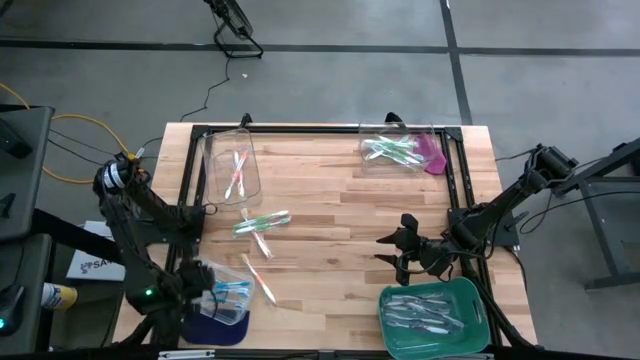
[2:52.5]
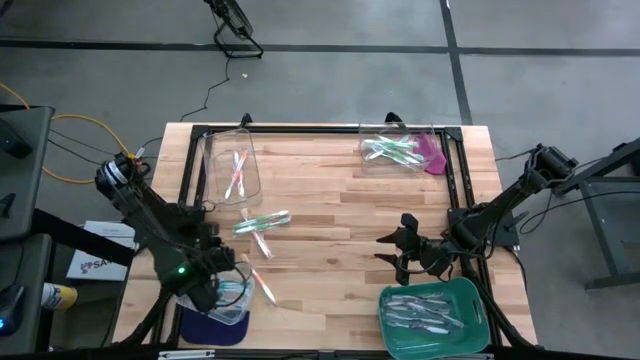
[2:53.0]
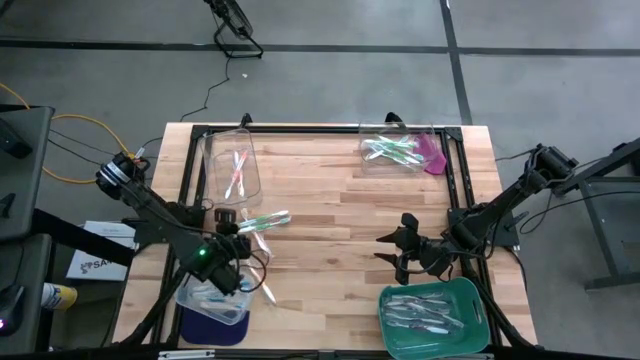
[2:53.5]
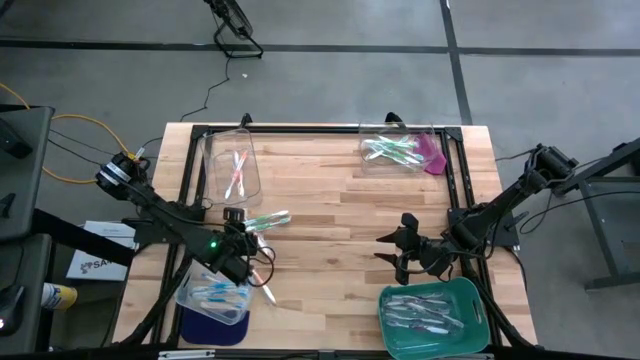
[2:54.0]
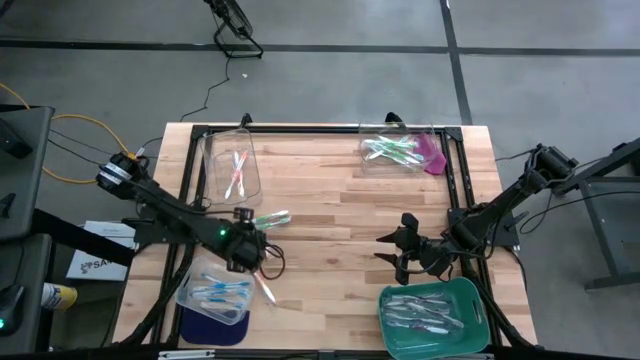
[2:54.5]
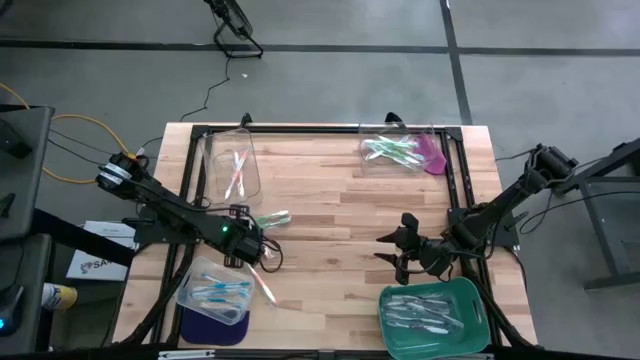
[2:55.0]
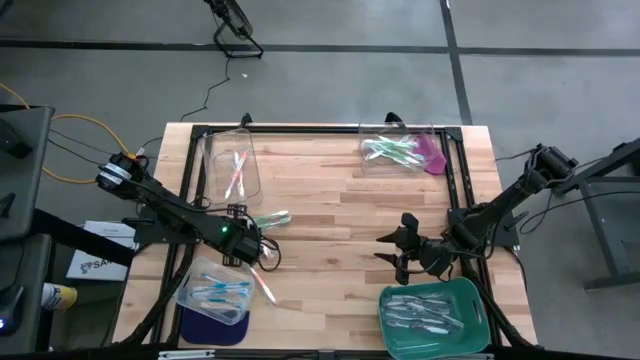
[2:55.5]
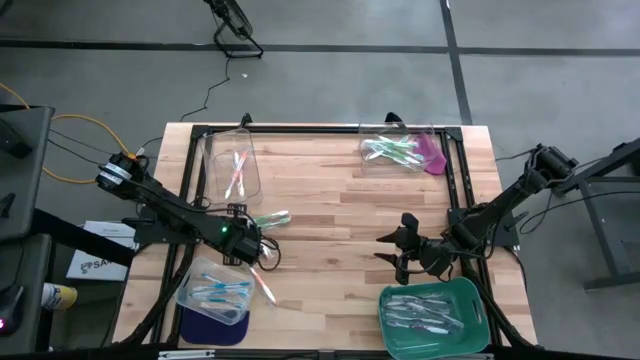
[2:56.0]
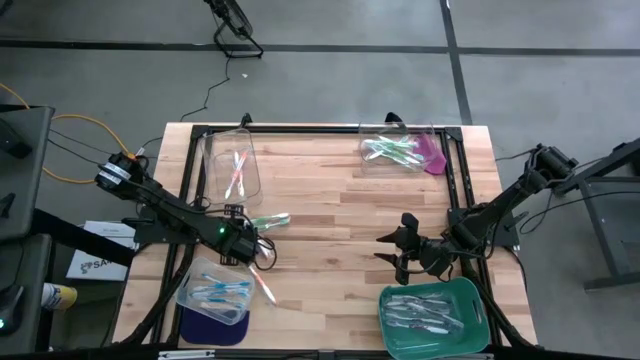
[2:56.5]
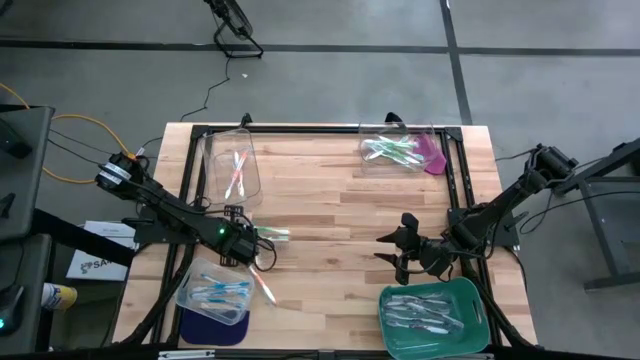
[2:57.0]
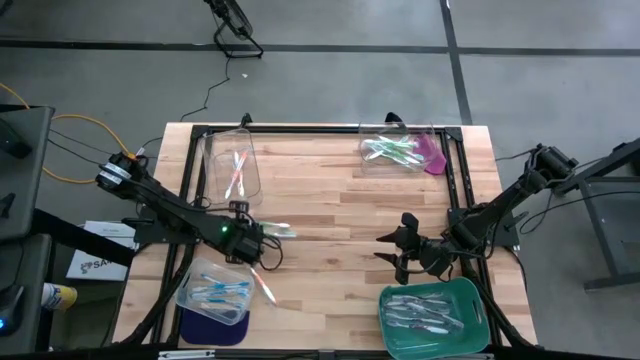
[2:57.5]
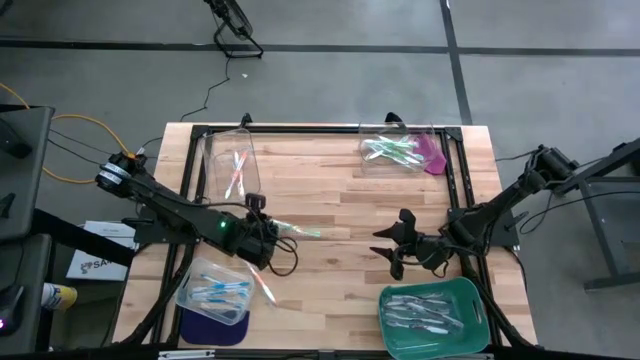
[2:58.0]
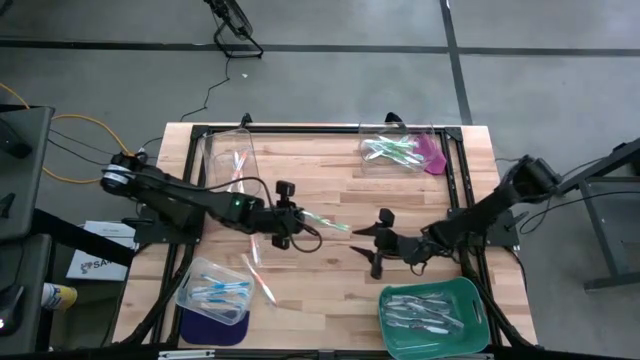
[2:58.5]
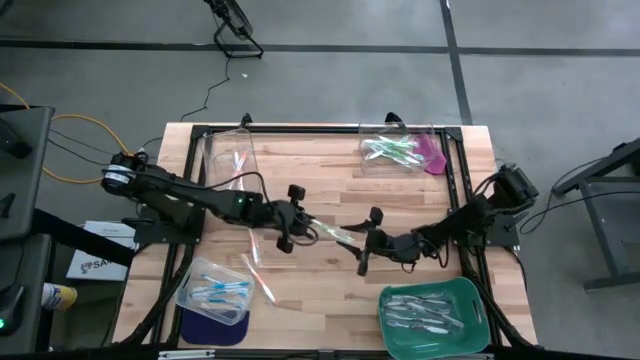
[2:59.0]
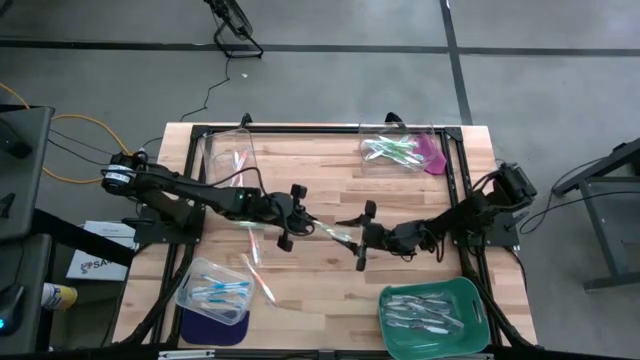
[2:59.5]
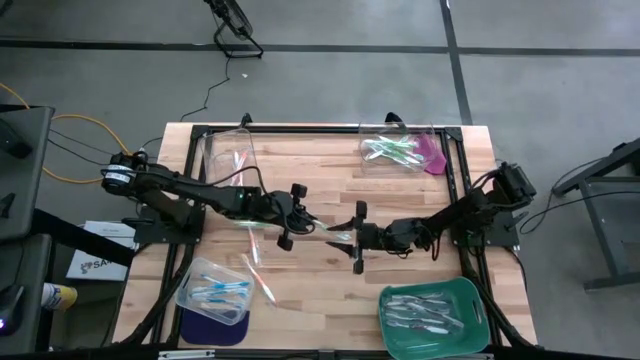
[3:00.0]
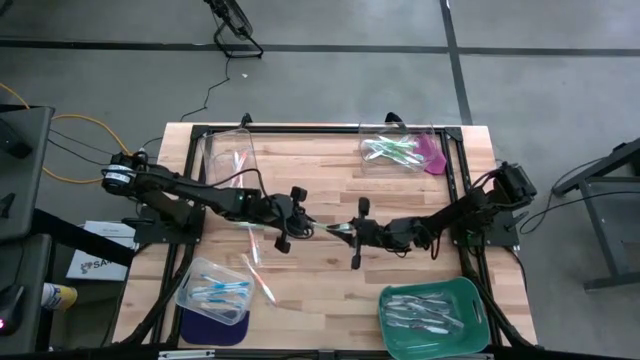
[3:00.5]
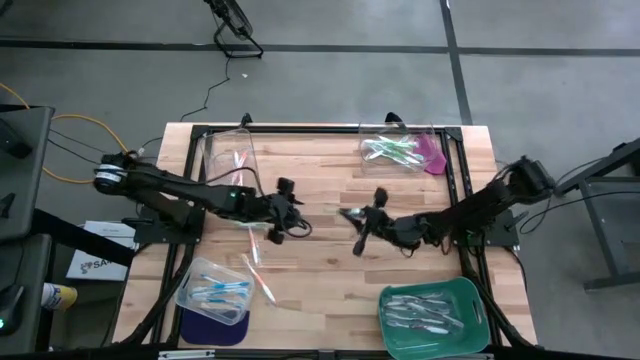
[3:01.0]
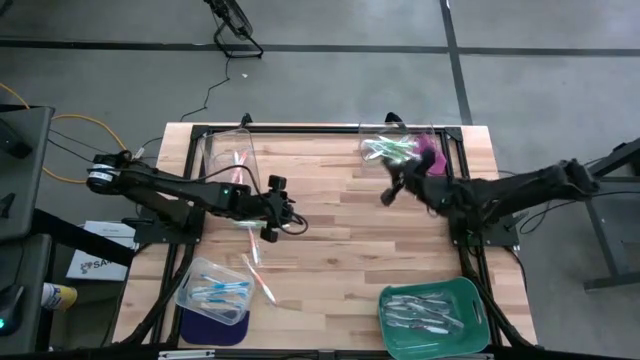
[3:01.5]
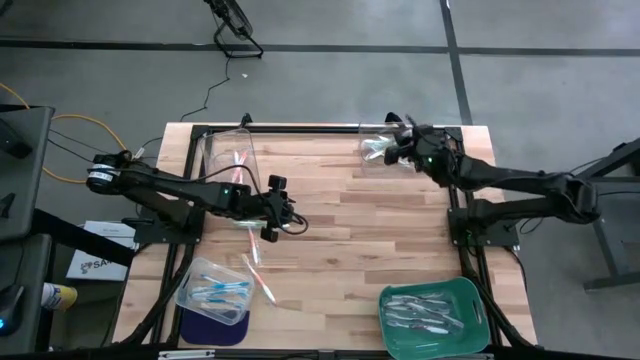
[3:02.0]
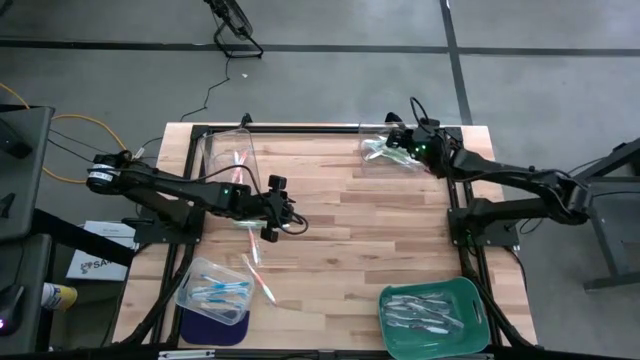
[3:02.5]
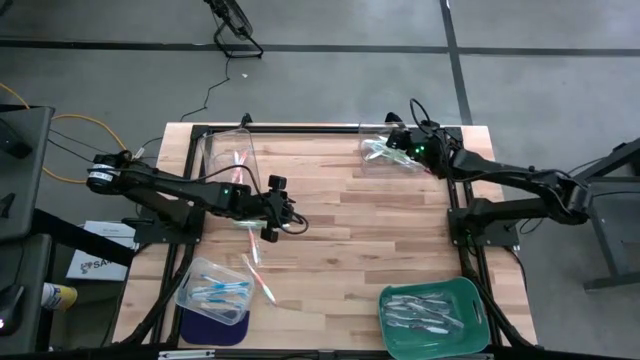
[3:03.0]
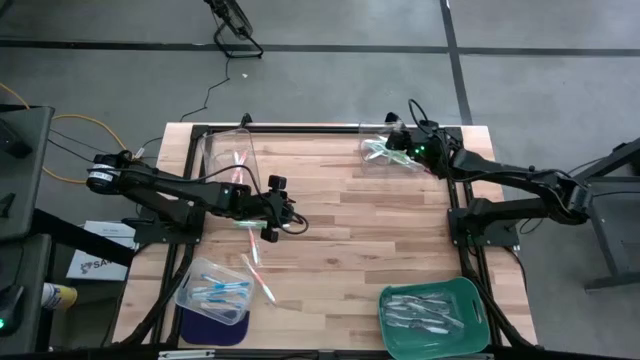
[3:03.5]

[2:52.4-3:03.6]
Task: Pick & Place Toothbrushes
Put the green toothbrush into the top right transparent bin

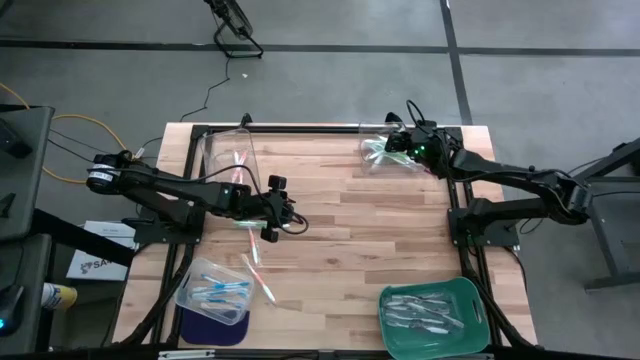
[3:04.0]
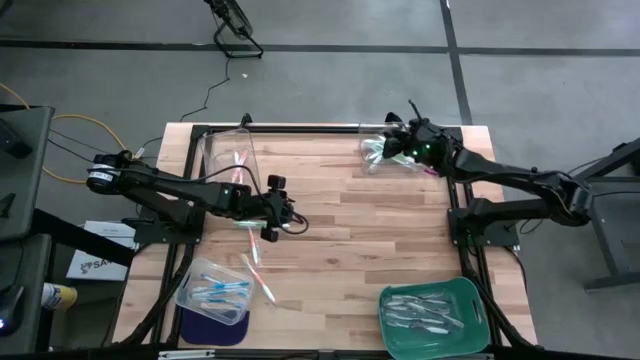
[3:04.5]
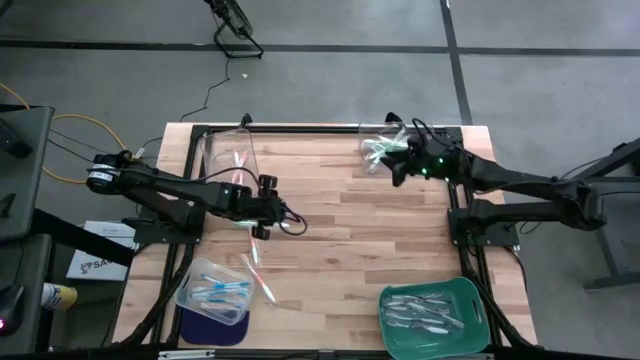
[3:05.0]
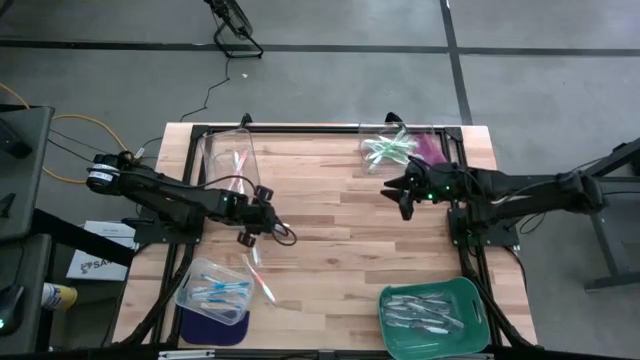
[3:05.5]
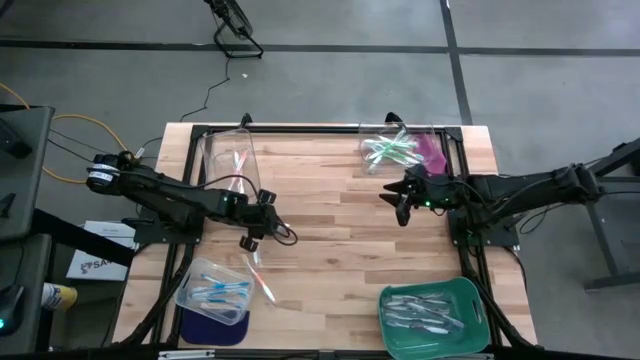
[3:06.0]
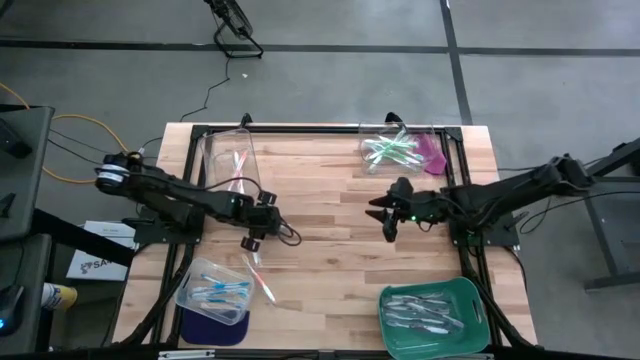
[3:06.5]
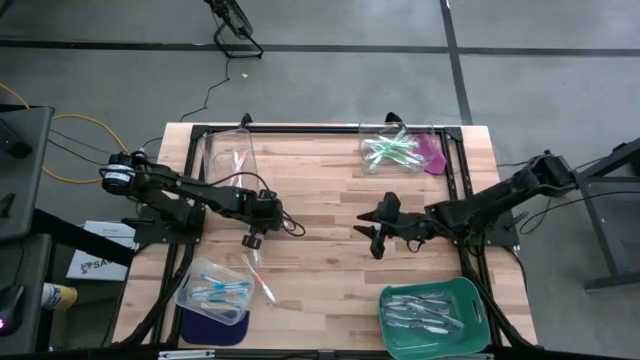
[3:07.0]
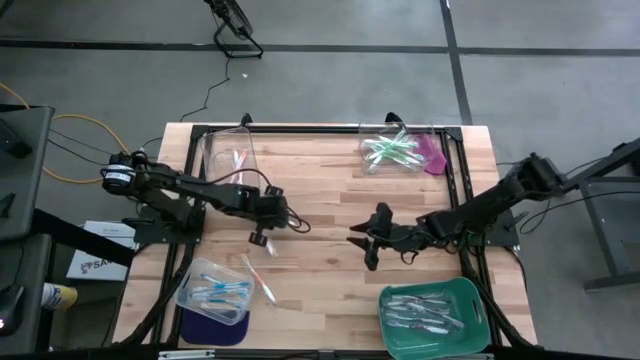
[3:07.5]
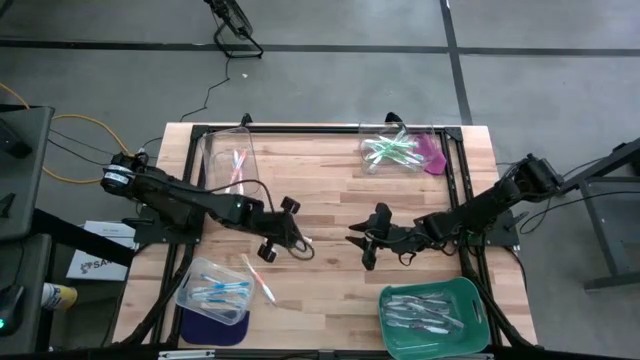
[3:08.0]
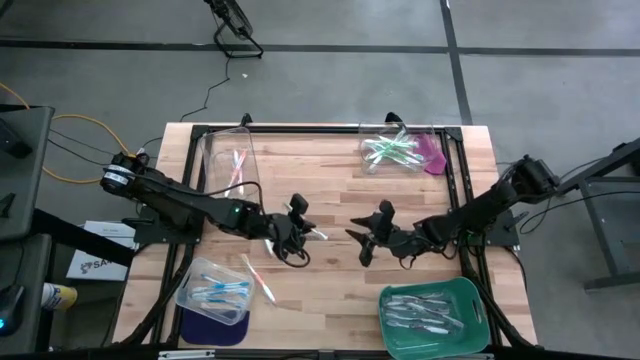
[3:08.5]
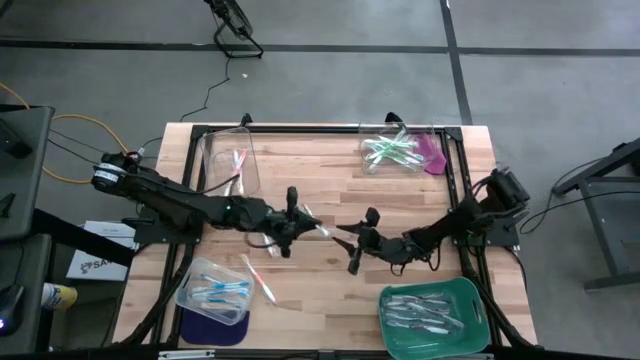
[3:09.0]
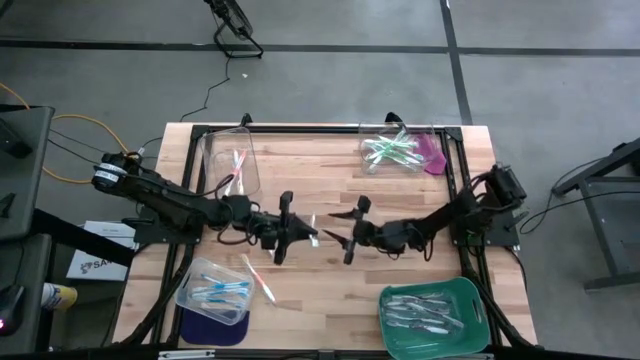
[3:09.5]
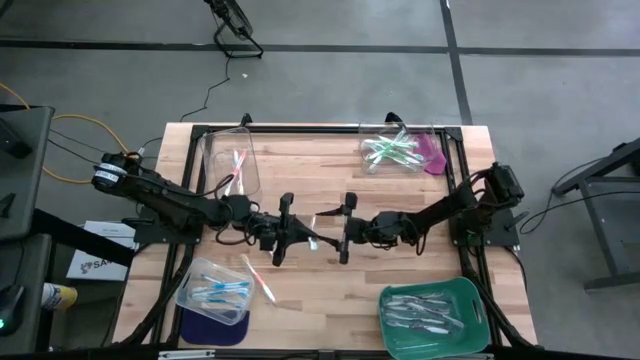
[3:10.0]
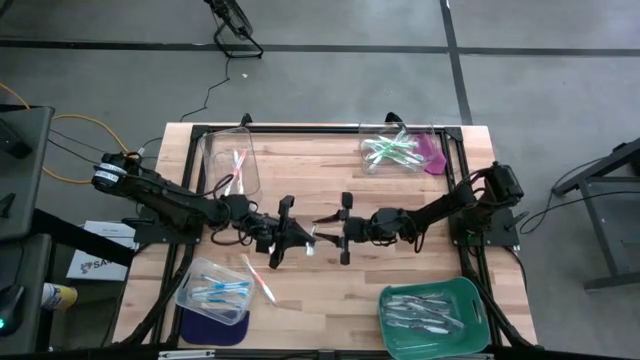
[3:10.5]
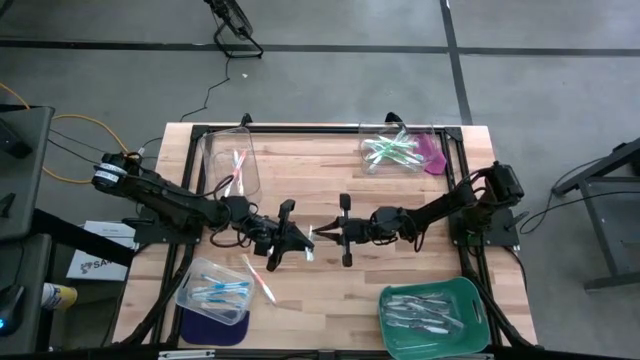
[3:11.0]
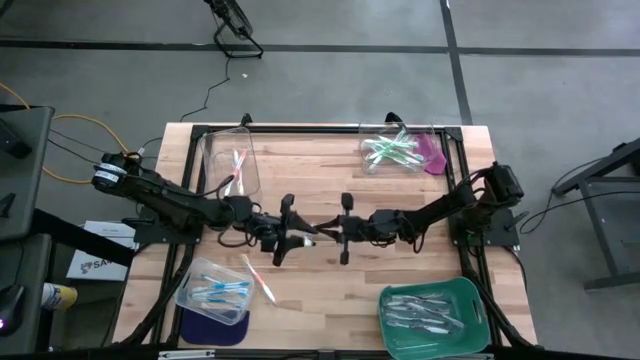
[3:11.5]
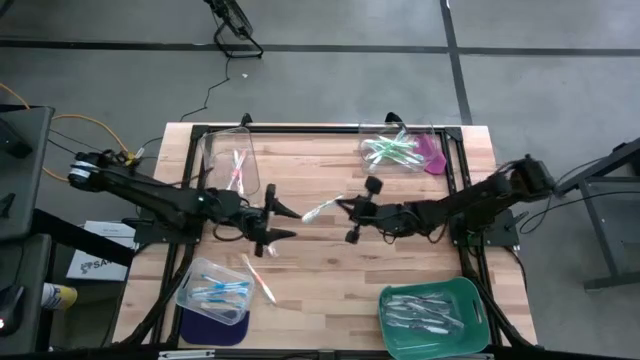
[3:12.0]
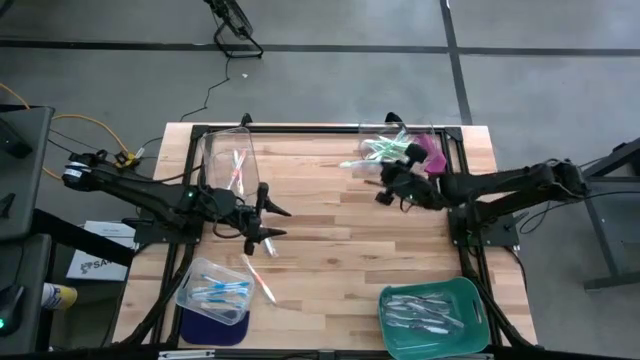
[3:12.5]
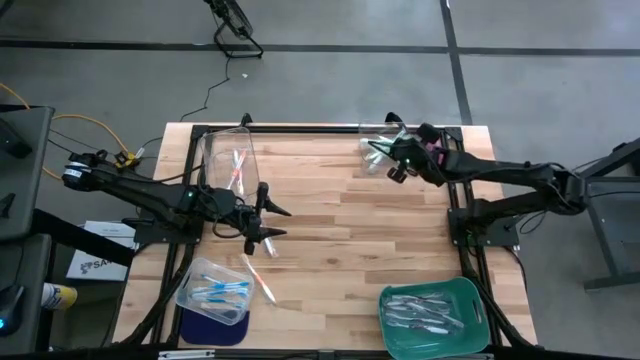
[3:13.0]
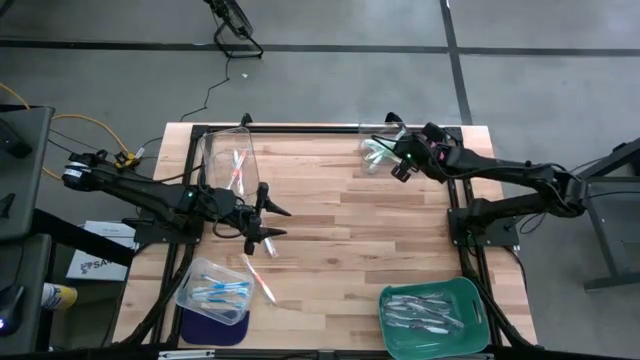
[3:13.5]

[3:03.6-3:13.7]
Put the green toothbrush into the top right transparent bin
